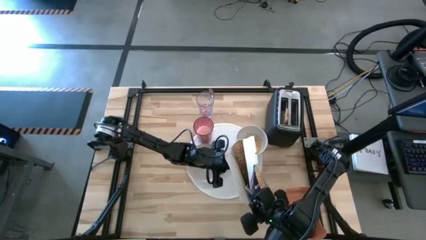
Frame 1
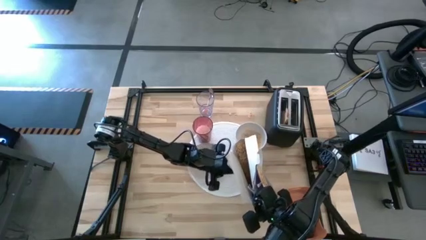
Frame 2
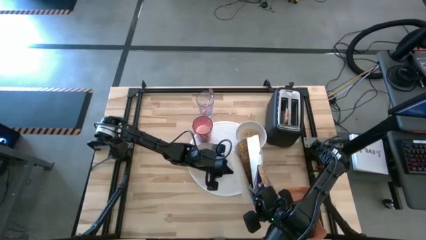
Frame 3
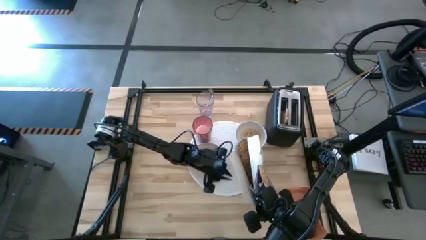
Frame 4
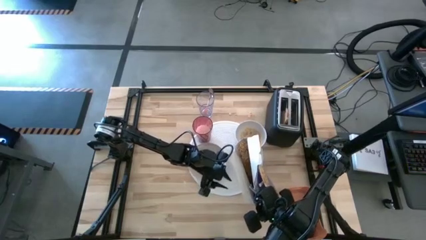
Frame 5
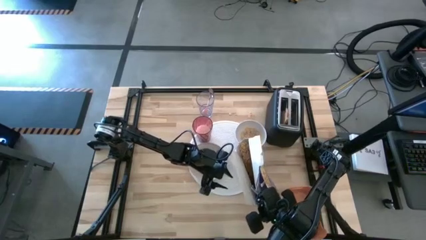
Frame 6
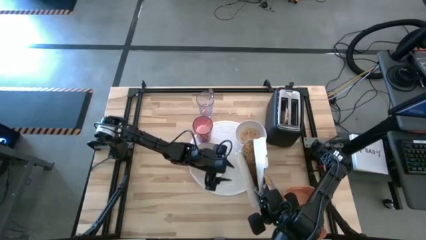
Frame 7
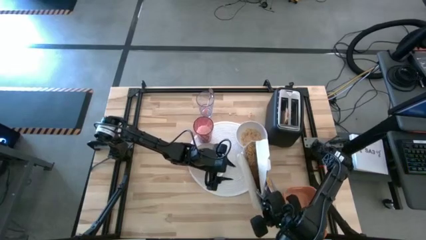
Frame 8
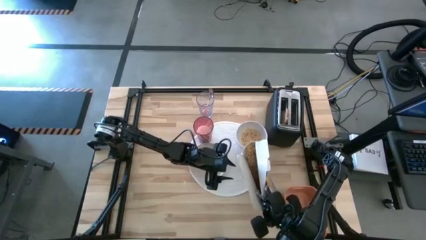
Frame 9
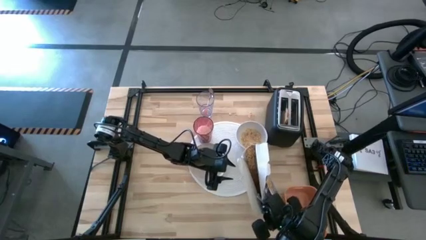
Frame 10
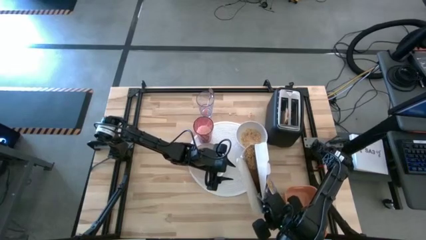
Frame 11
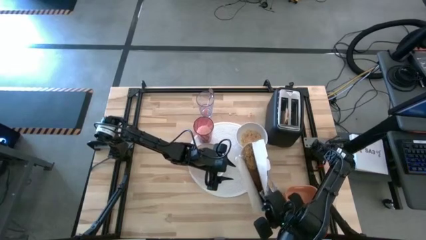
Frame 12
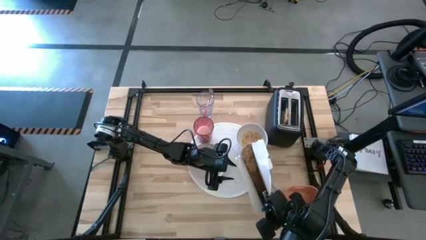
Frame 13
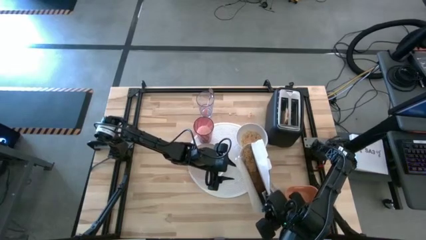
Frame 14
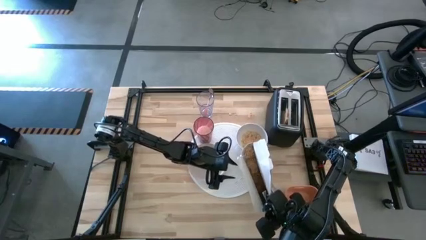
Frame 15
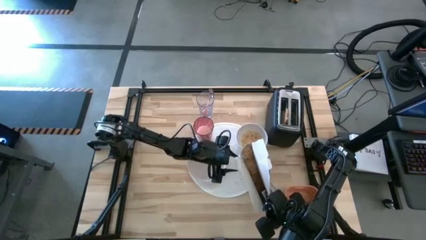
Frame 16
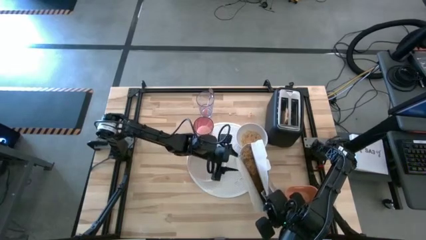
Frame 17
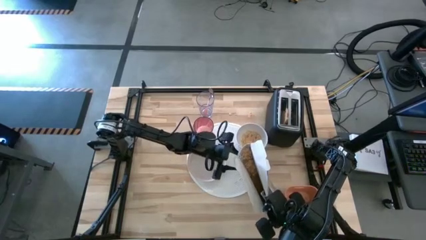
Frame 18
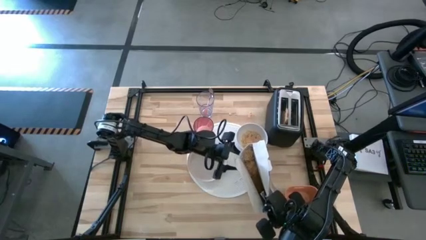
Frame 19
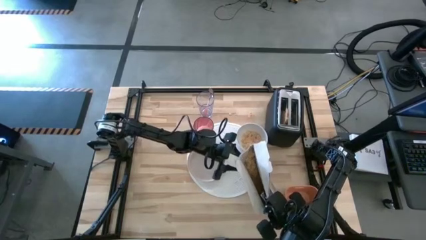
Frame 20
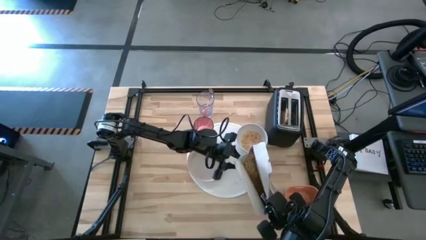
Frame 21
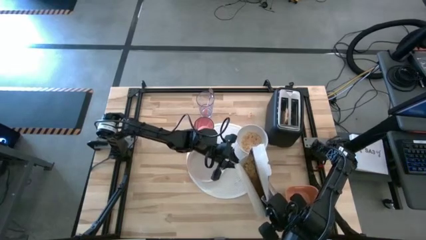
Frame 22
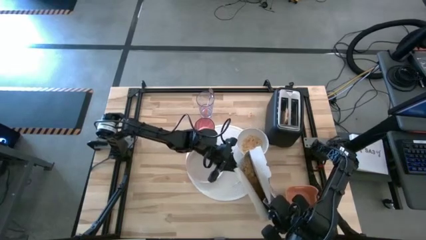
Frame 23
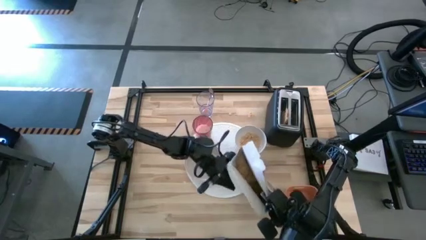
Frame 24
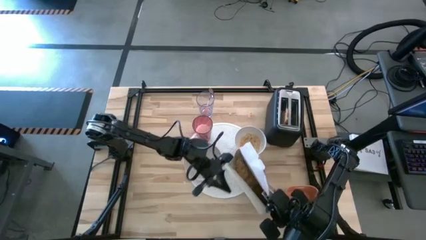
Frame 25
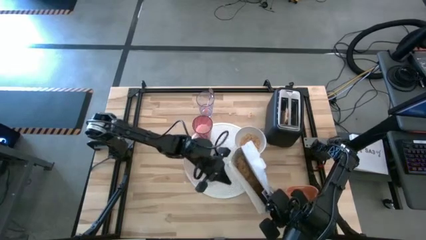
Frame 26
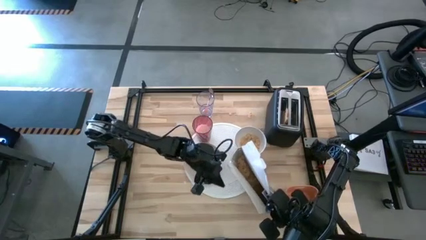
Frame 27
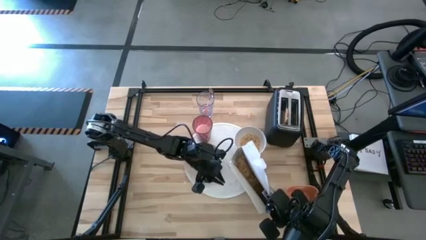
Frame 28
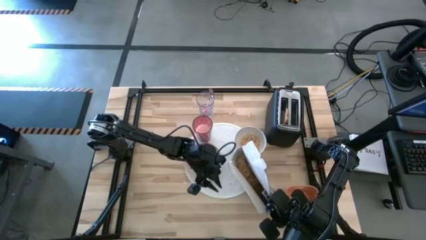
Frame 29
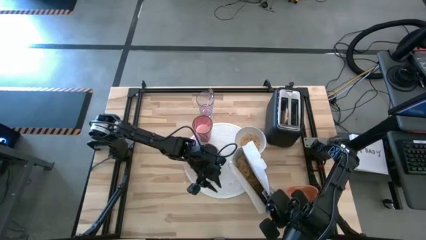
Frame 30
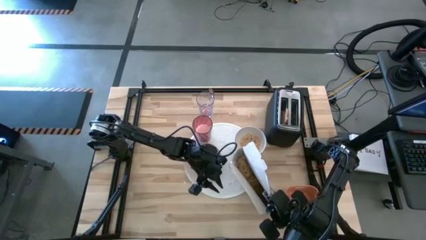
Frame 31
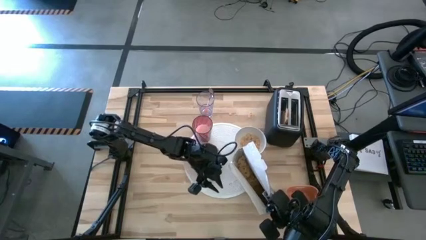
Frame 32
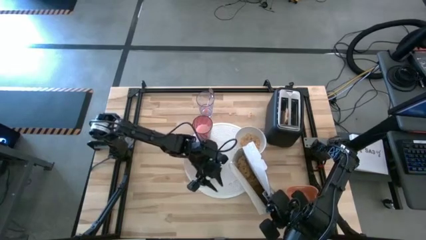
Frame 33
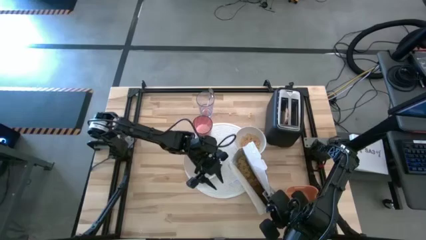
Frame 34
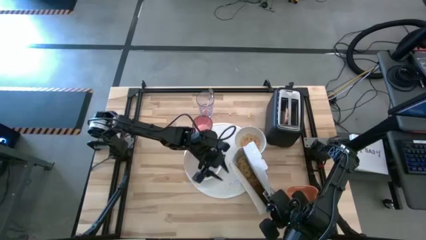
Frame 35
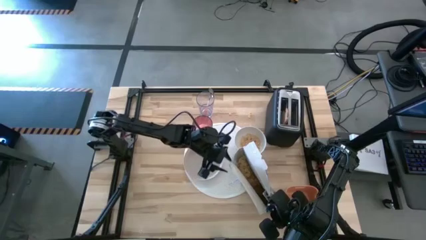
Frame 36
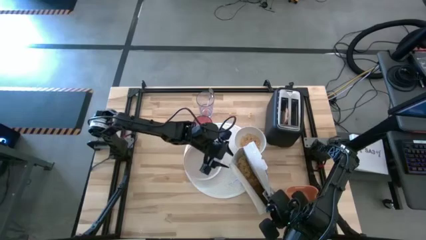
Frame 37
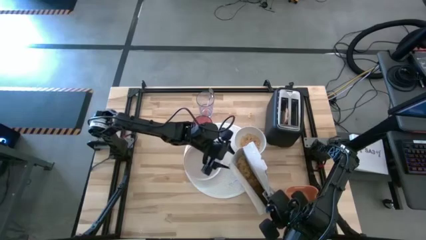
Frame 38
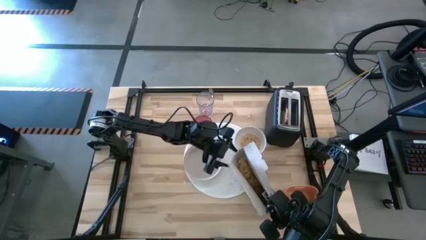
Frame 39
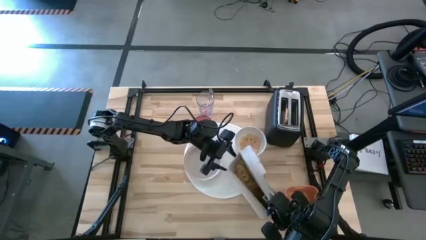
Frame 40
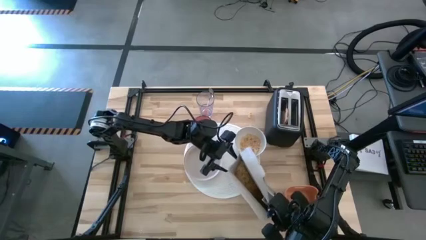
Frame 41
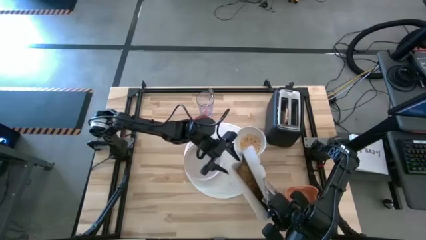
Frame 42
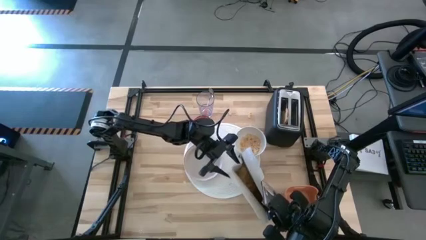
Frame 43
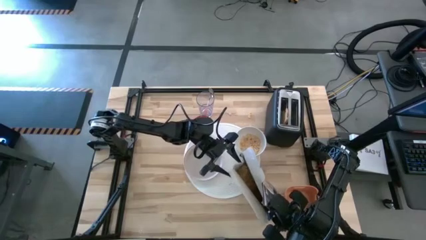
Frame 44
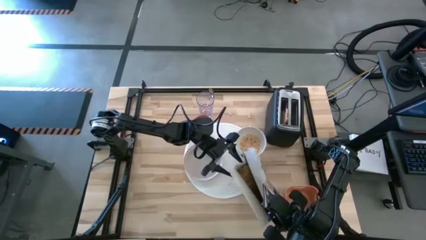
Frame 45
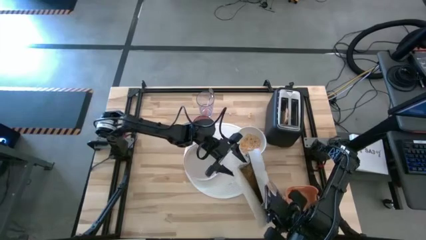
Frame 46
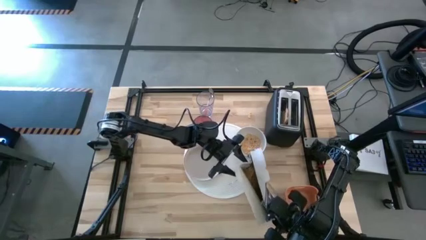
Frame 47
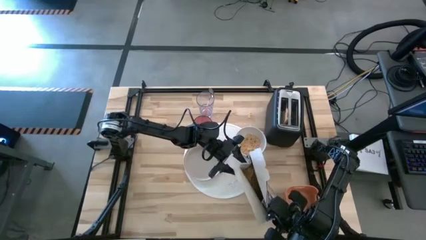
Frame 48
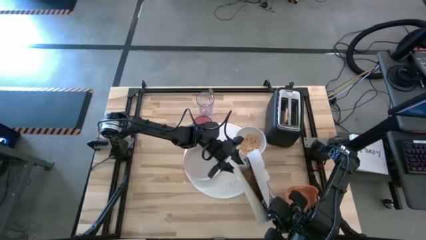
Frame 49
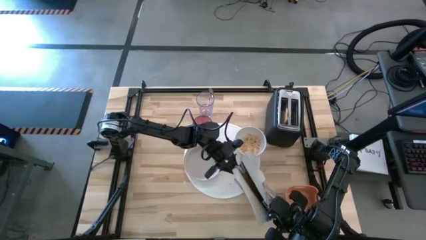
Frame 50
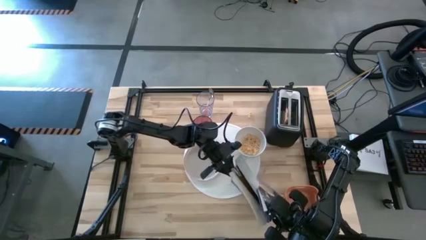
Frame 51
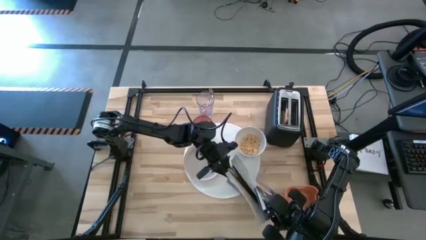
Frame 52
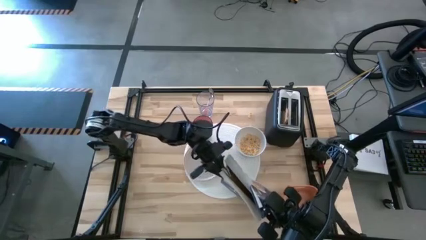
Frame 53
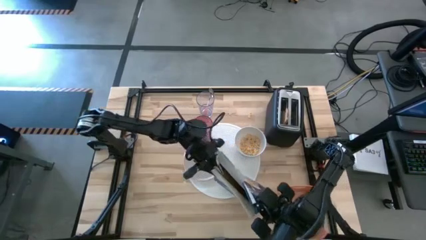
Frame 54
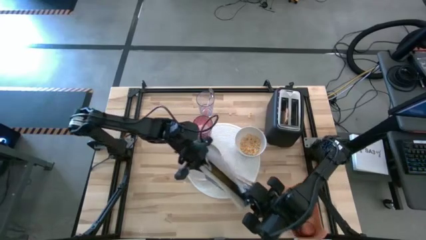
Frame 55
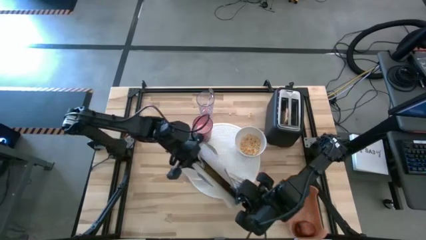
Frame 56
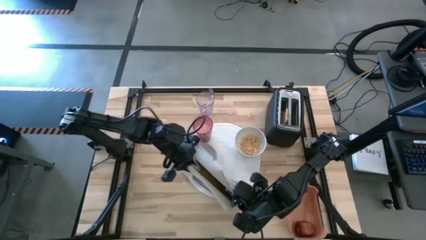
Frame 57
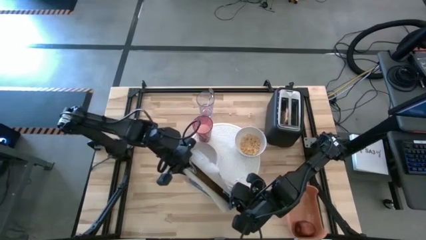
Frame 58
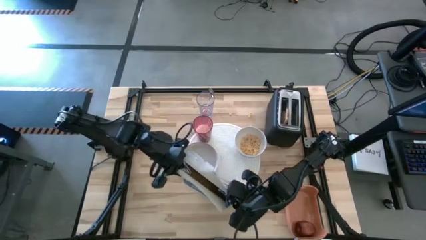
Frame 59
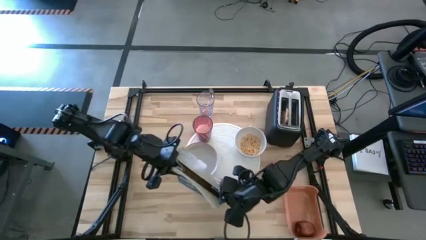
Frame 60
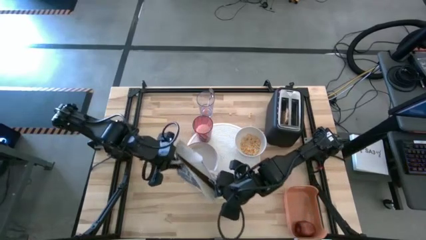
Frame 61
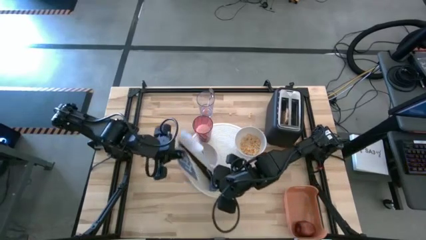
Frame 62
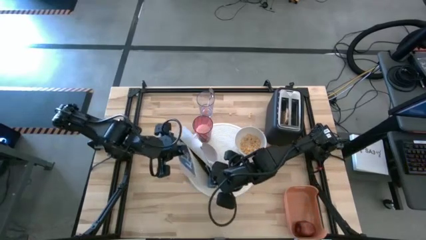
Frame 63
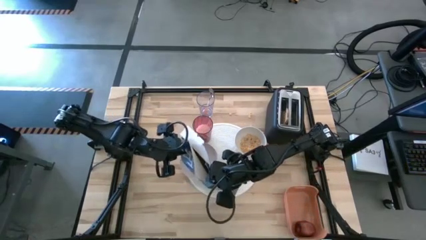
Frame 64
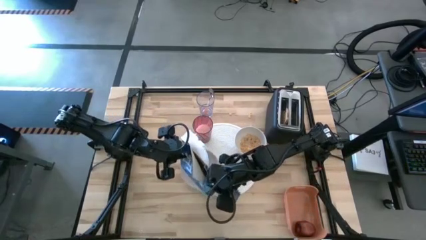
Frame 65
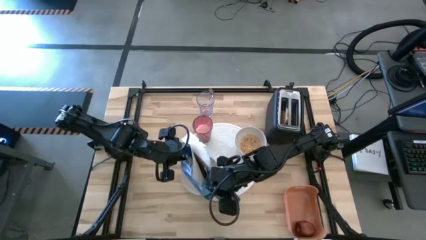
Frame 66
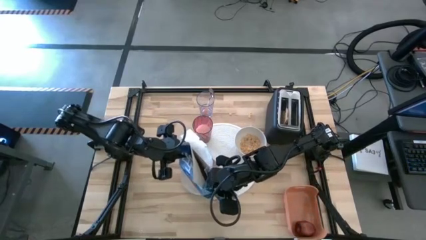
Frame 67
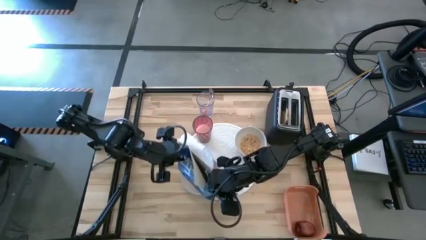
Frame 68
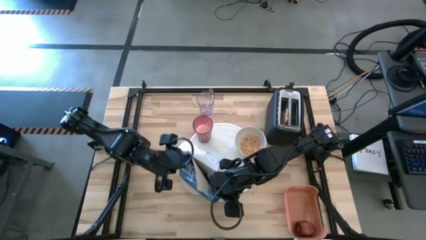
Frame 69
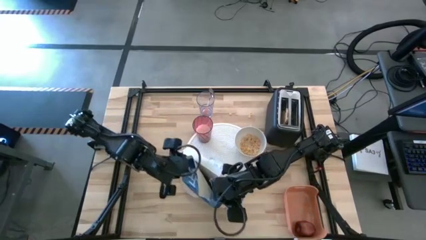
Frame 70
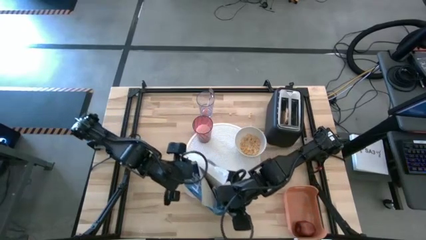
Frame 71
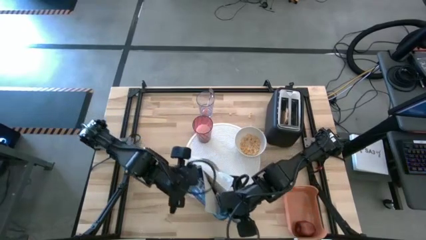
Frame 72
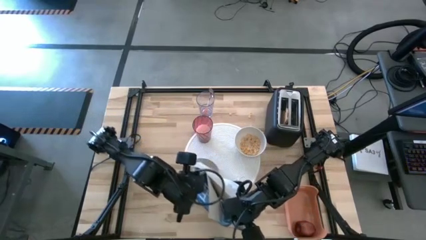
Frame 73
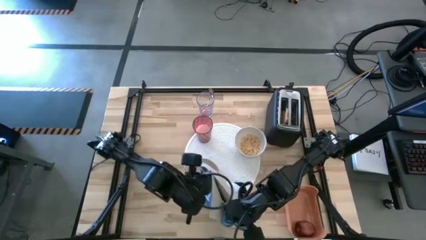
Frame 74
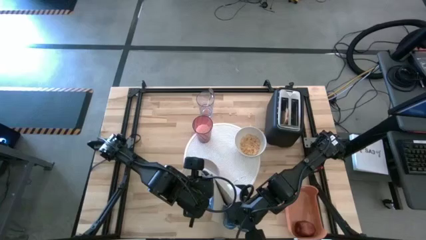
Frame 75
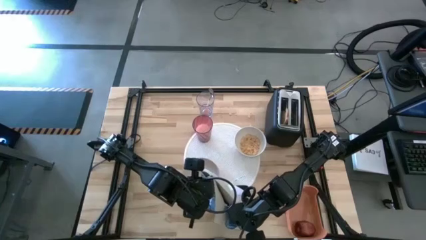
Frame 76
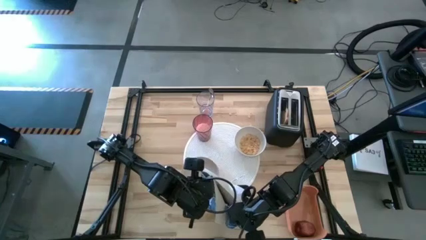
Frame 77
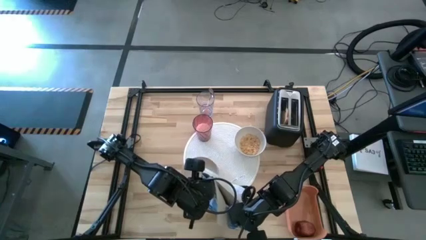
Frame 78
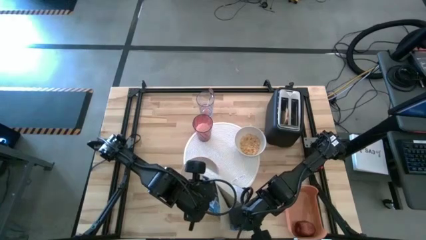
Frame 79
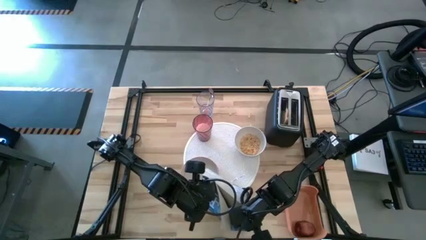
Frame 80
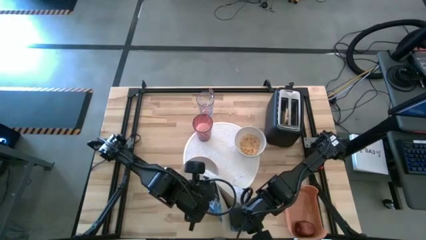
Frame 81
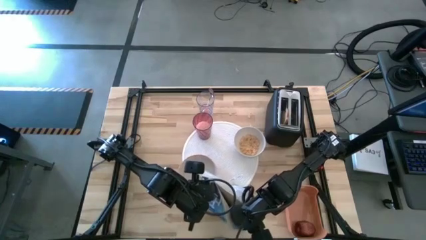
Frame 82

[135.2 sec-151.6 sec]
Task: Arrange a breakfast setting
Pour the cereal from the cereal box into the white bowl
